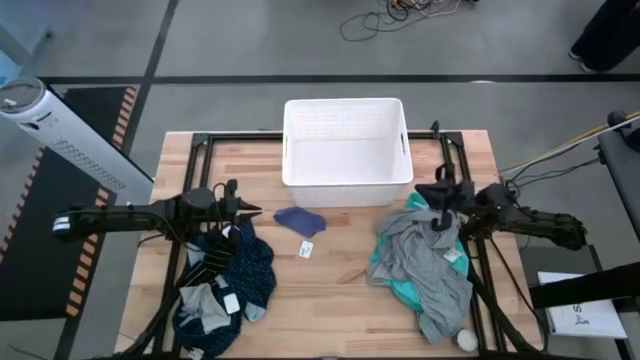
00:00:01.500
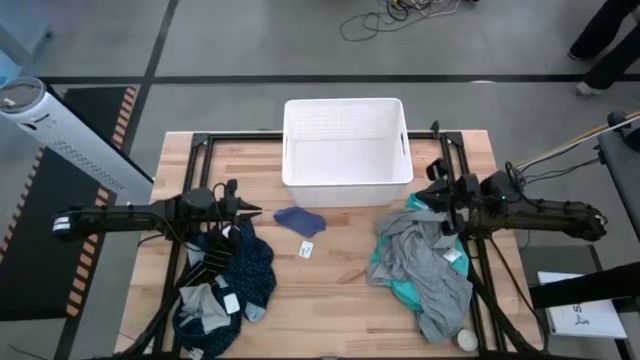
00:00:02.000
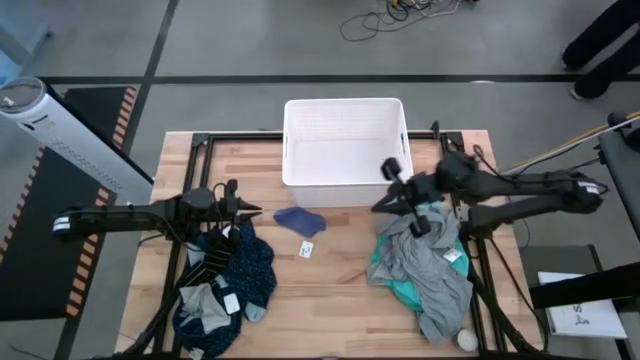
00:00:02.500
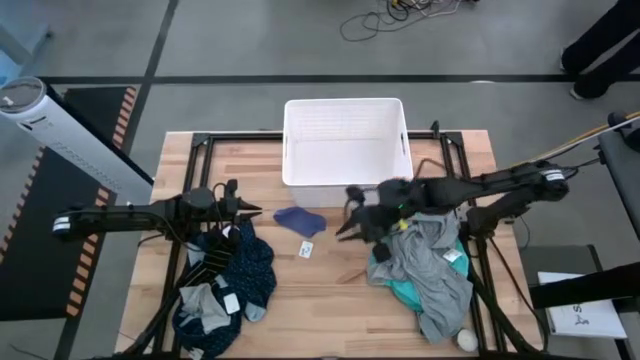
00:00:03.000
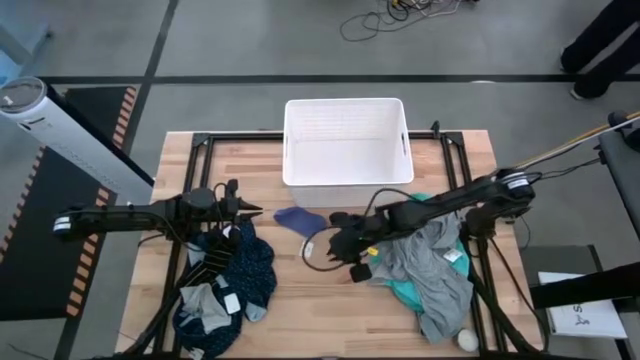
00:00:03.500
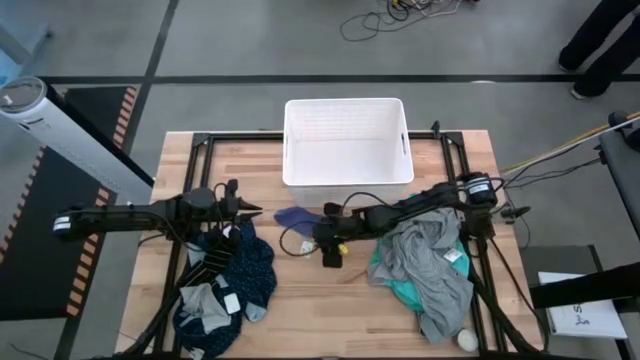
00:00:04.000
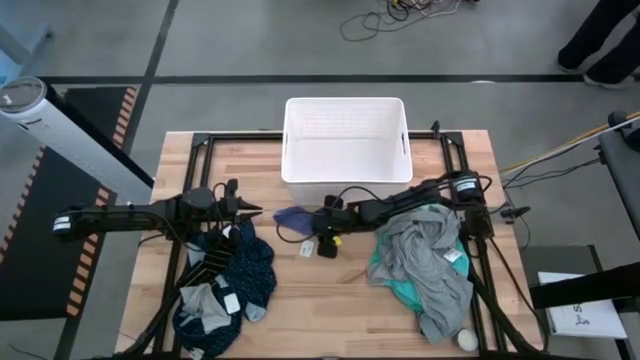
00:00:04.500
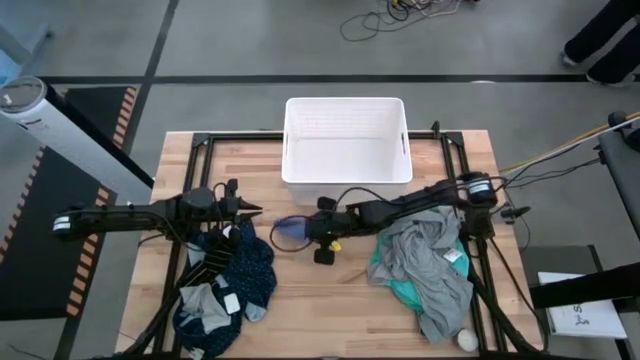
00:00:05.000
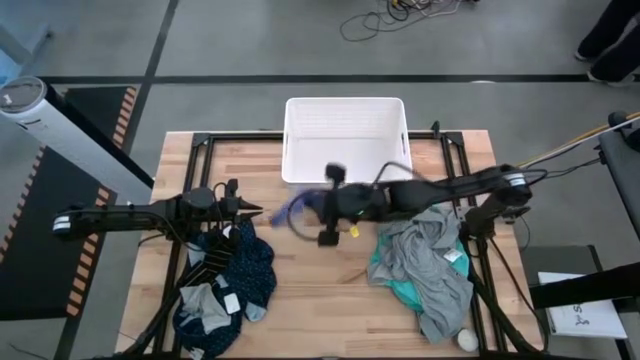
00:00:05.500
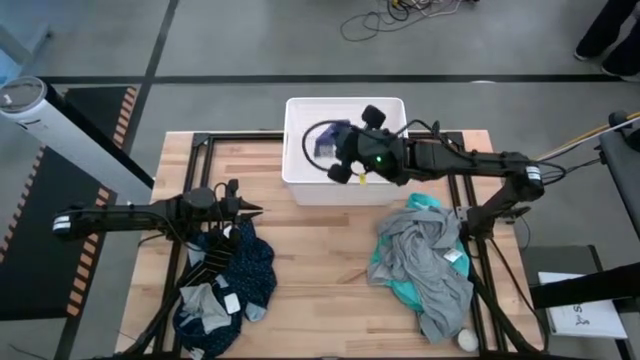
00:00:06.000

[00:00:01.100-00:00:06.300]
Task: Sort clothes
Put the top blue sock into the white laundry bin

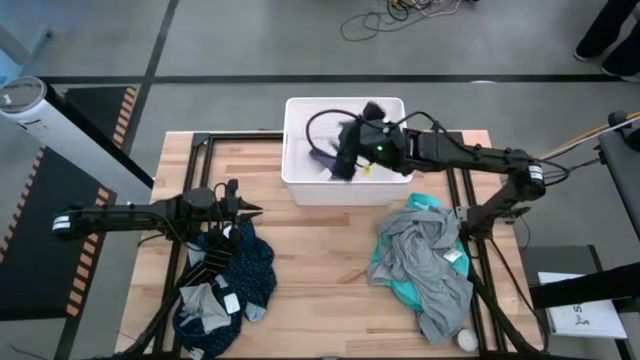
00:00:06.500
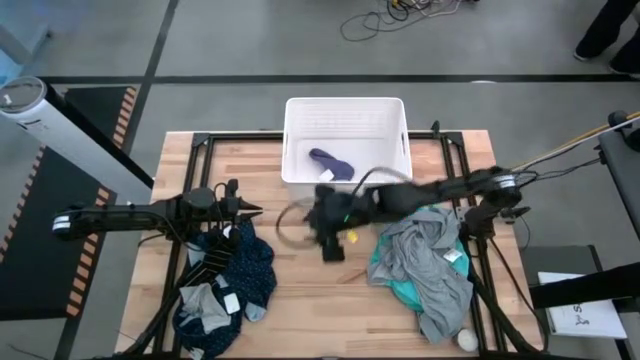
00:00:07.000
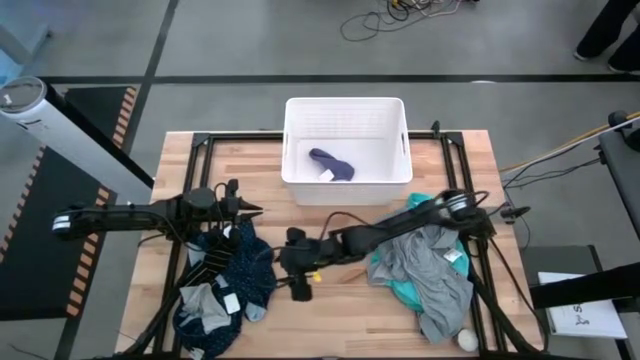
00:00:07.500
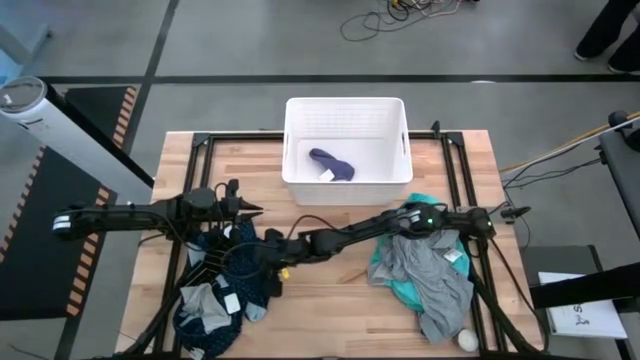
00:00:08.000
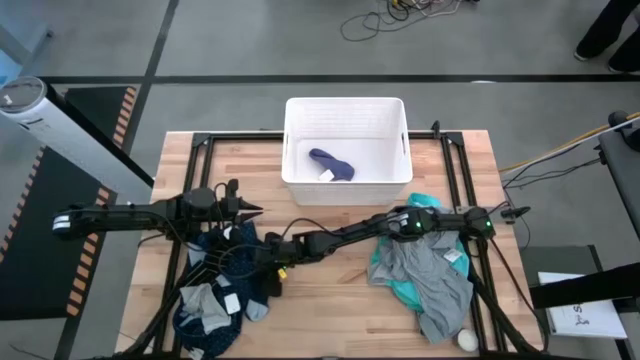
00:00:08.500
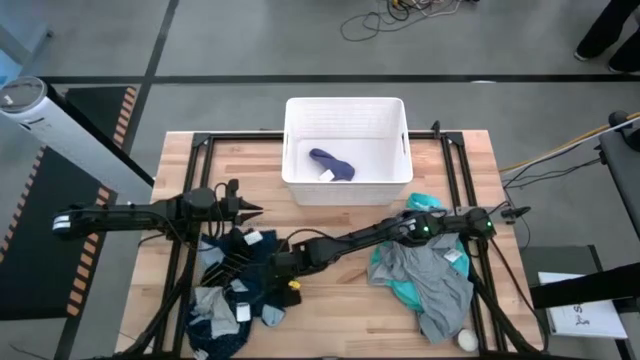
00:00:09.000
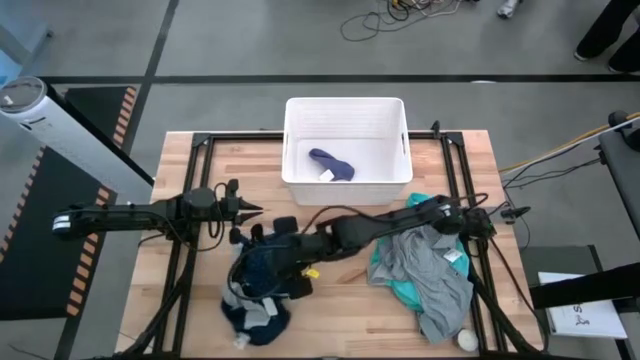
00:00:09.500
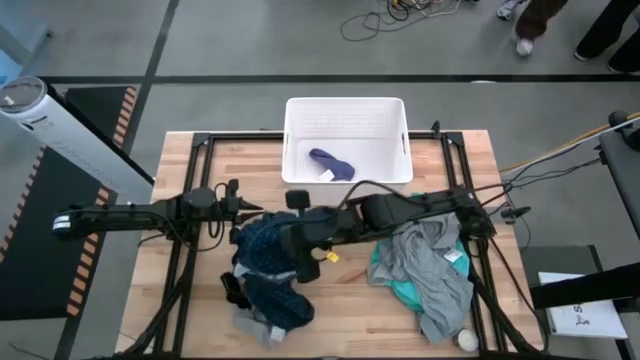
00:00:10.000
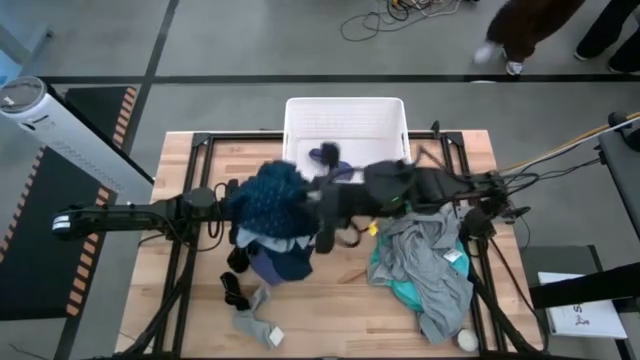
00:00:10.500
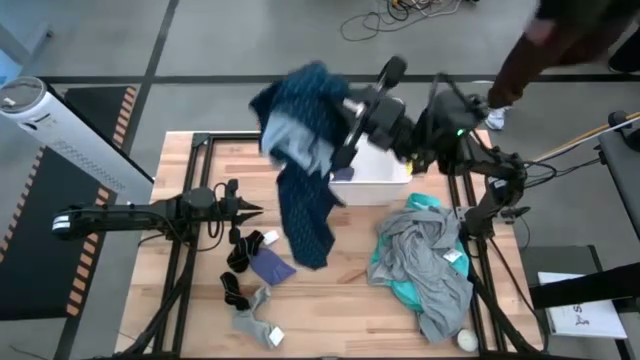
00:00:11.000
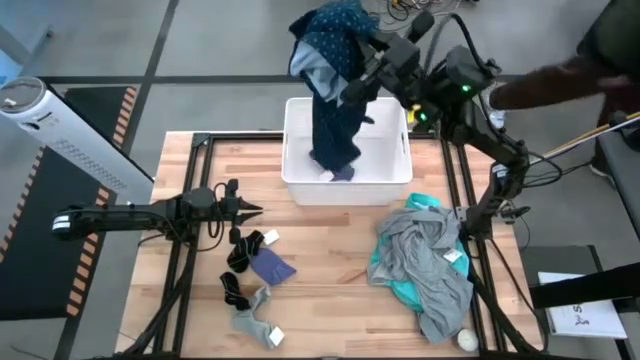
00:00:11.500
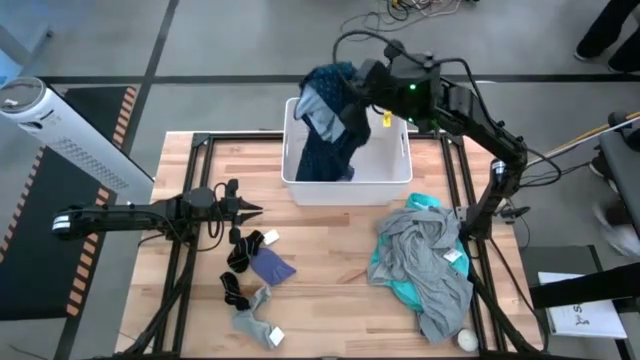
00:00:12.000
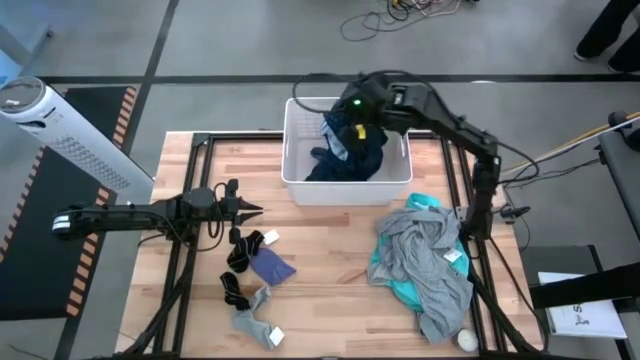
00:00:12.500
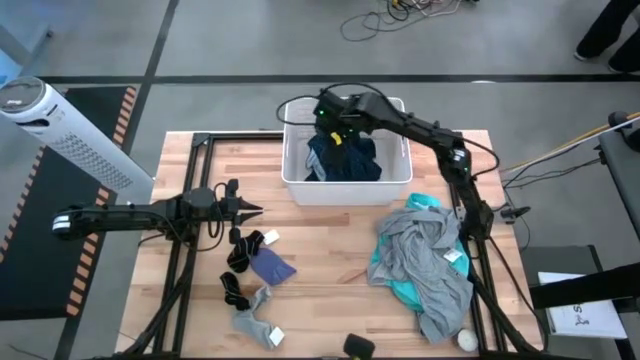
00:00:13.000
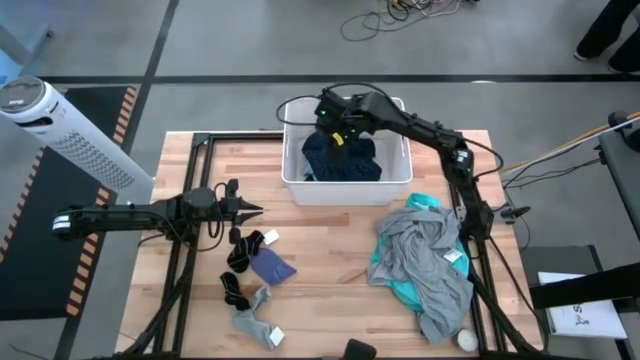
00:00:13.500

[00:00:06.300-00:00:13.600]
Put the blue button down polo into the white laundry bin

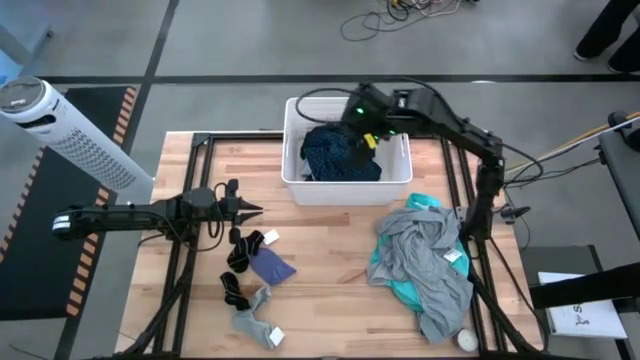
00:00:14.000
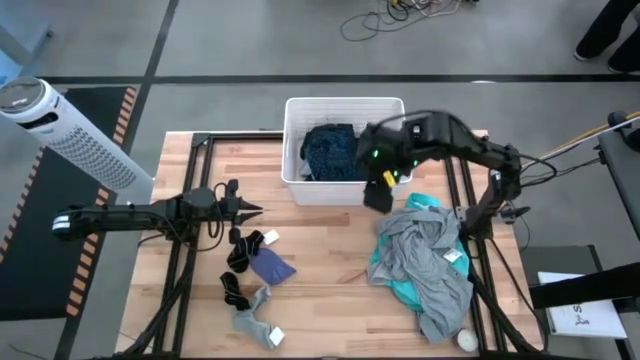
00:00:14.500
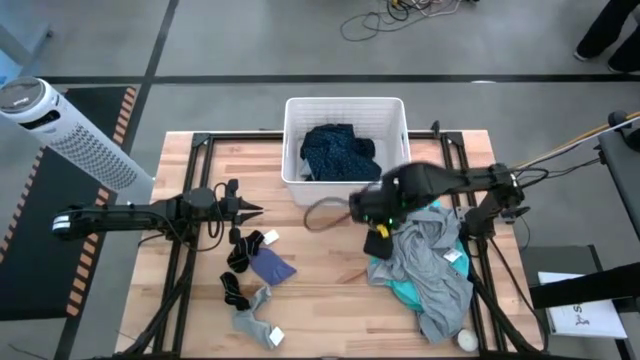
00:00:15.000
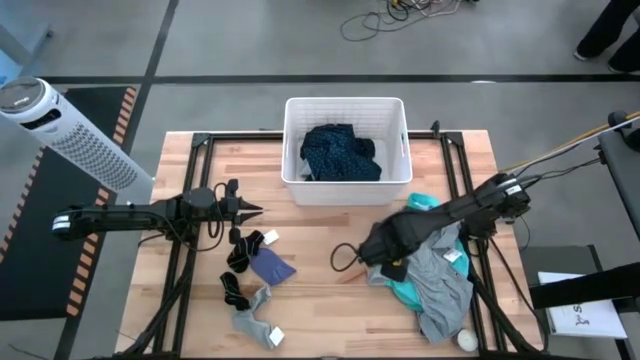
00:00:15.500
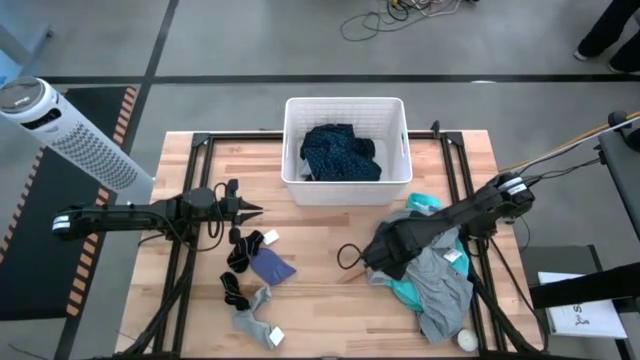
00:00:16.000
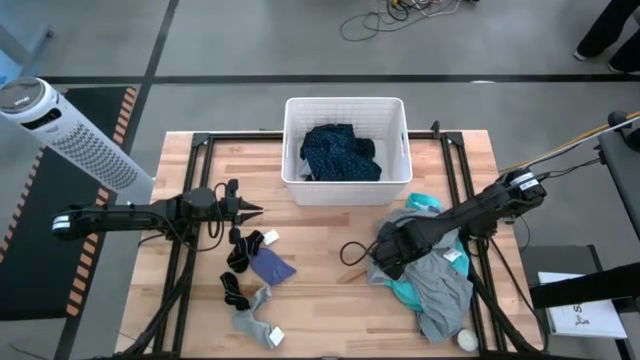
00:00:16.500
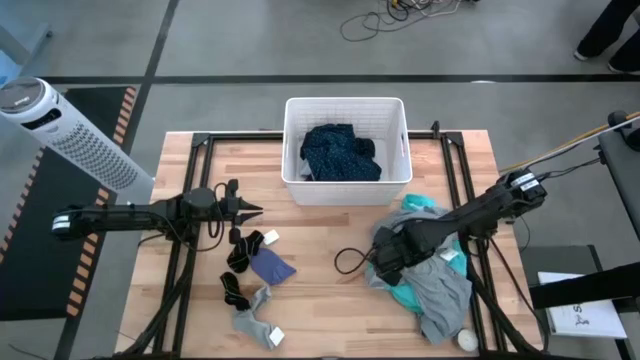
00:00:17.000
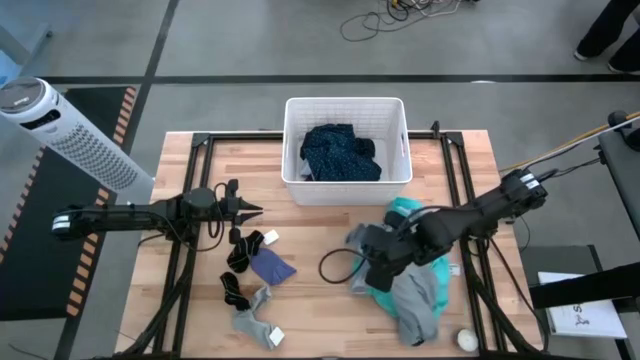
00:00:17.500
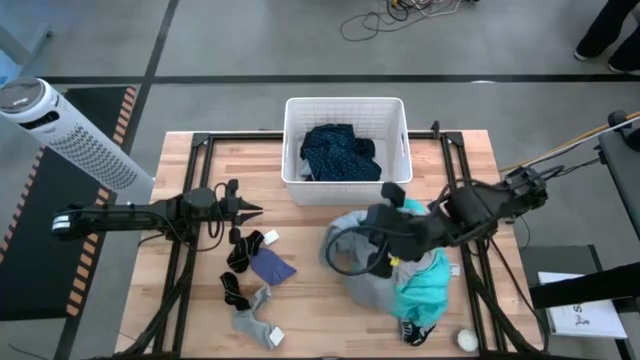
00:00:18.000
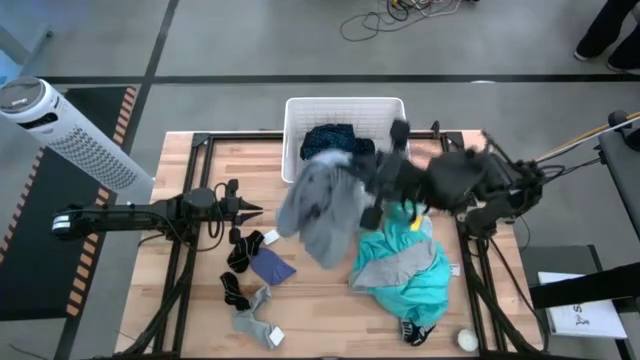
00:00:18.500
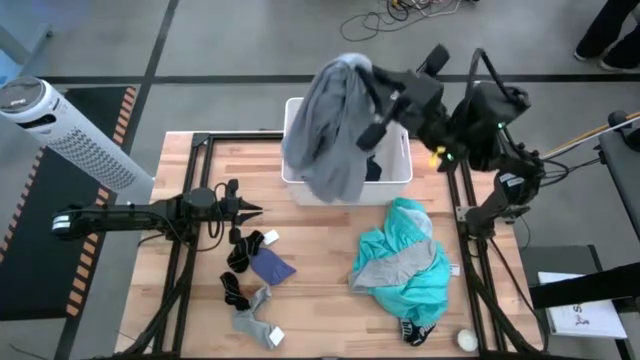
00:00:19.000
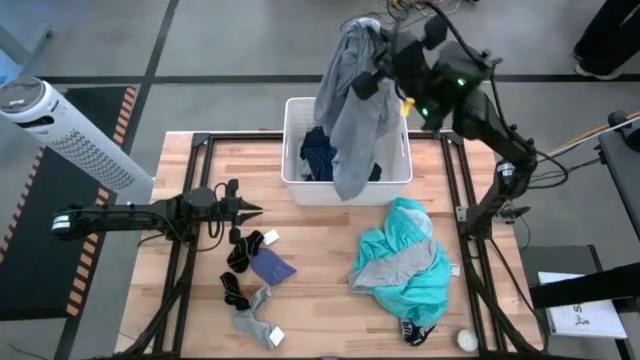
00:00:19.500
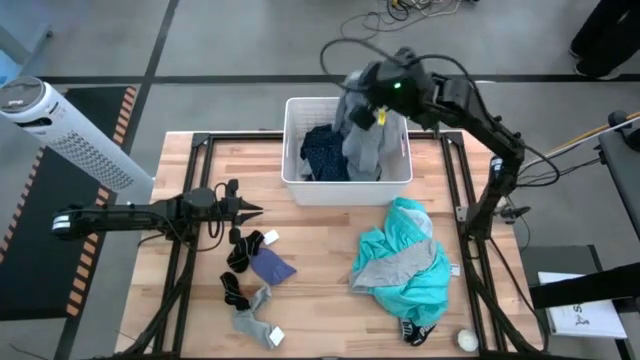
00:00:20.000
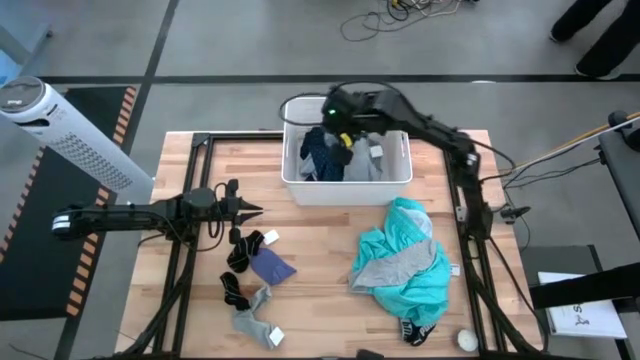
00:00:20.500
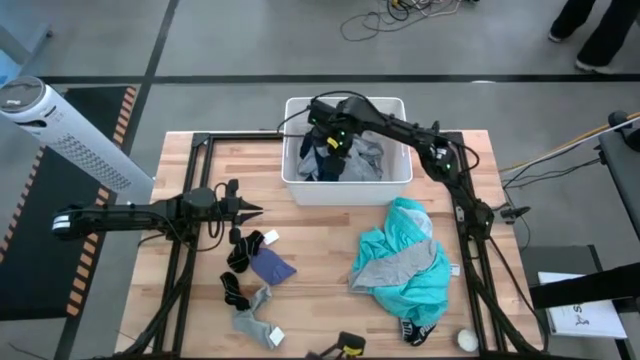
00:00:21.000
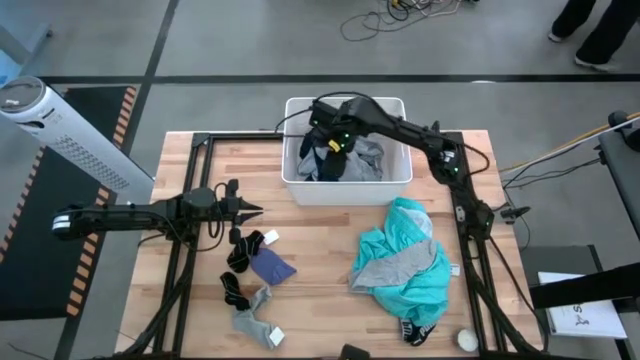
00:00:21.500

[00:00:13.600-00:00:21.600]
Put the gray shirt into the white laundry bin

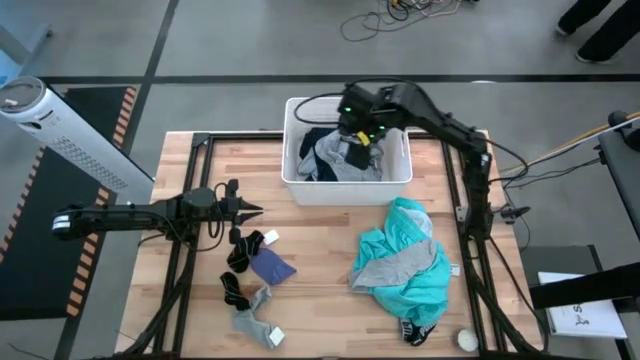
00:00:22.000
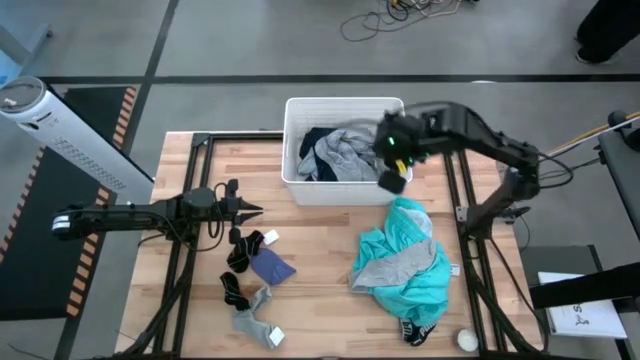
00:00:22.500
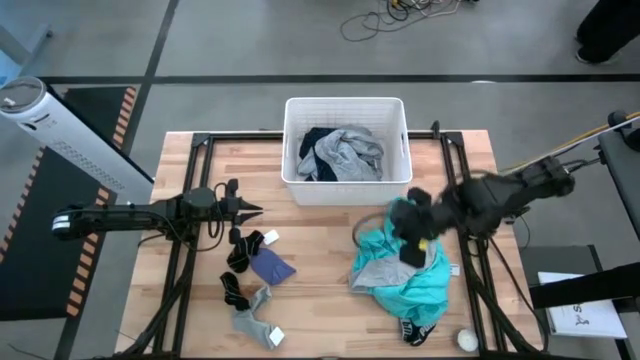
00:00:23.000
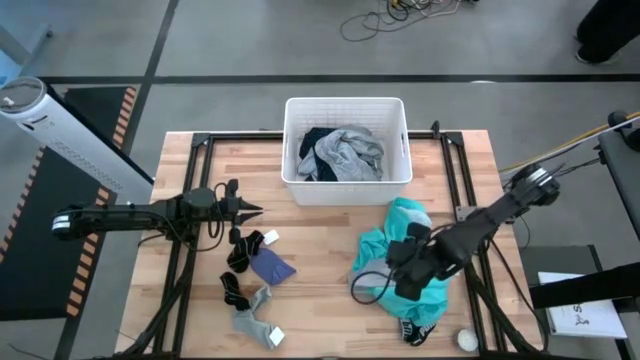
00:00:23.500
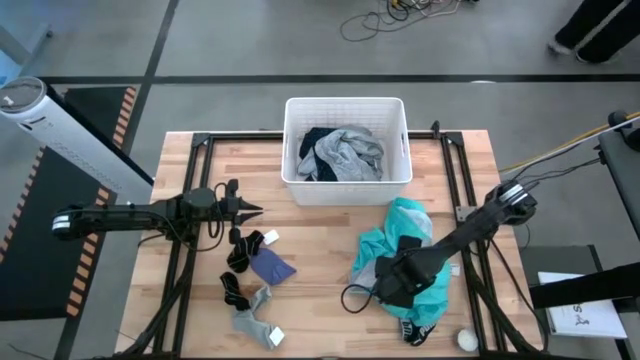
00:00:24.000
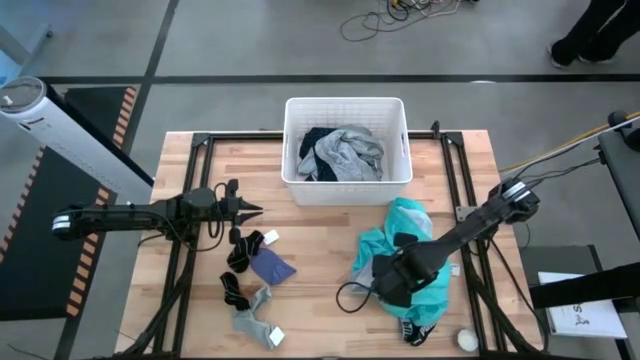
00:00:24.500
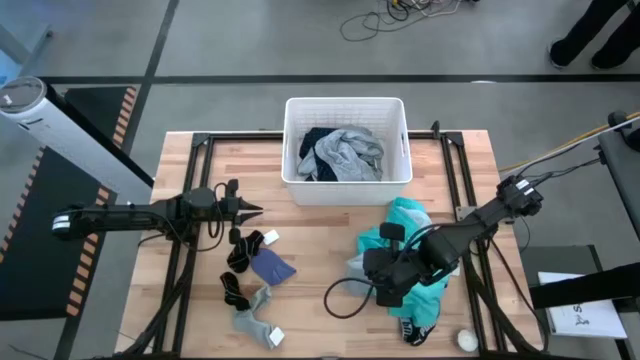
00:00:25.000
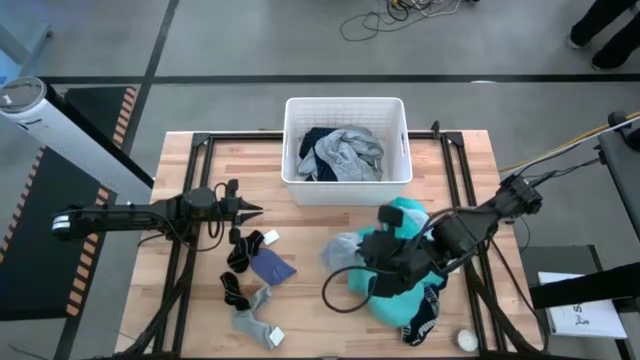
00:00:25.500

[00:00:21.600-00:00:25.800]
Put the right gray socks into the white laundry bin
